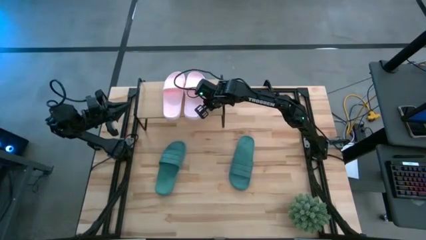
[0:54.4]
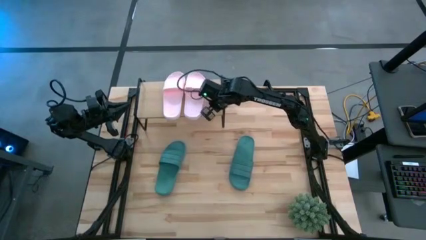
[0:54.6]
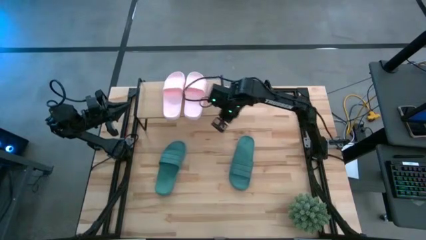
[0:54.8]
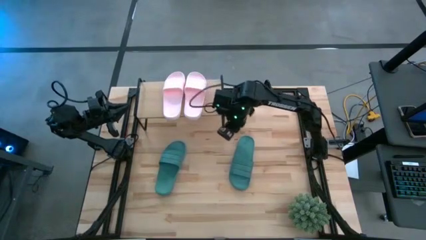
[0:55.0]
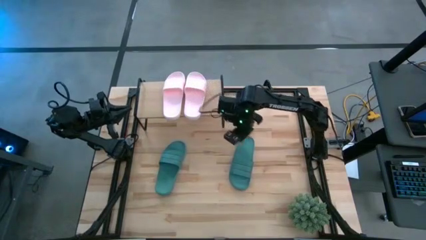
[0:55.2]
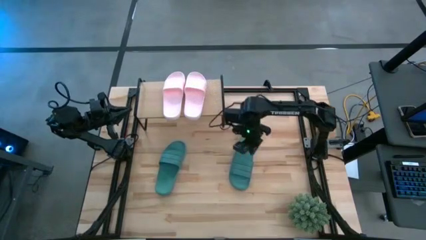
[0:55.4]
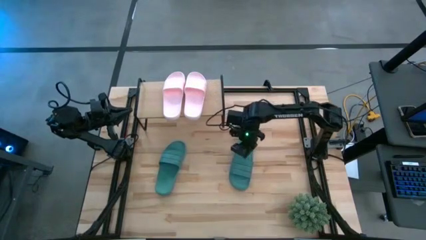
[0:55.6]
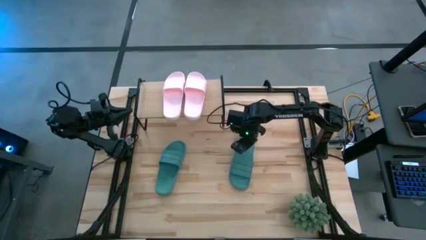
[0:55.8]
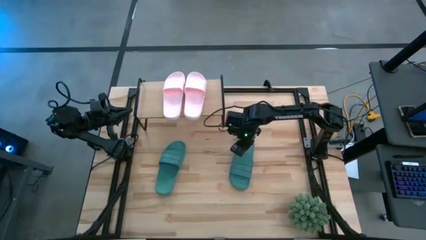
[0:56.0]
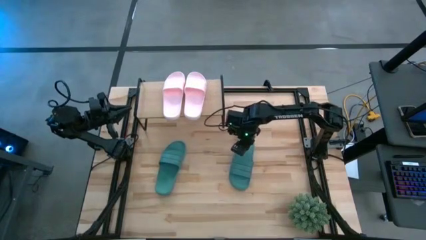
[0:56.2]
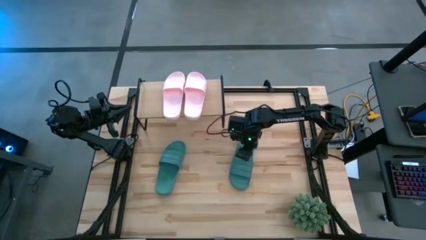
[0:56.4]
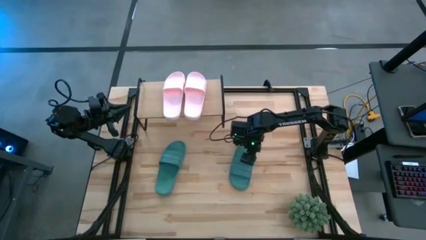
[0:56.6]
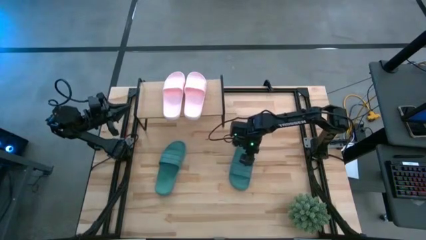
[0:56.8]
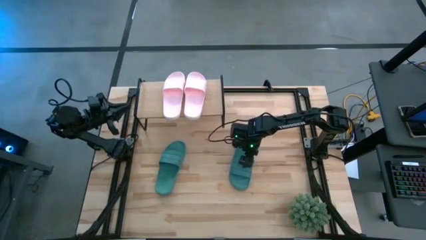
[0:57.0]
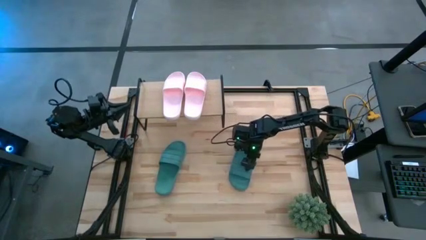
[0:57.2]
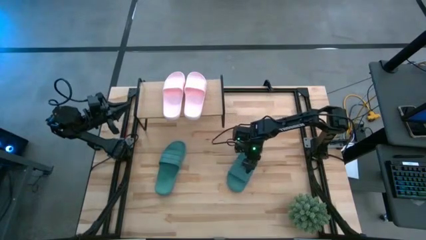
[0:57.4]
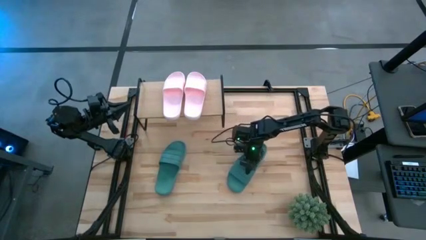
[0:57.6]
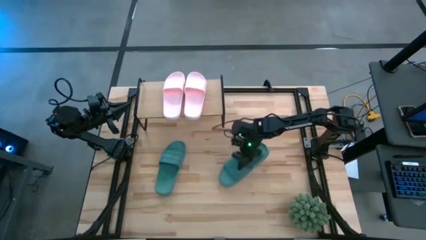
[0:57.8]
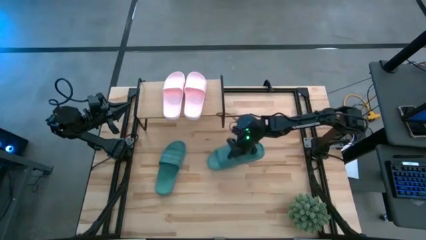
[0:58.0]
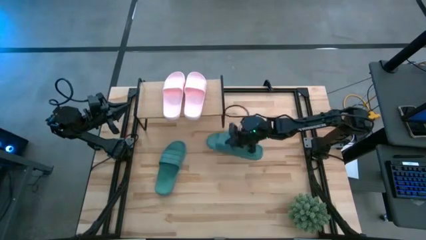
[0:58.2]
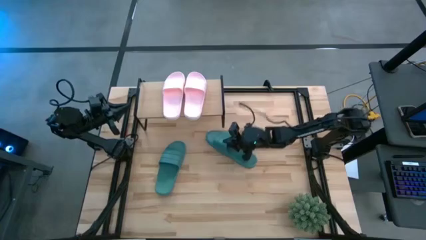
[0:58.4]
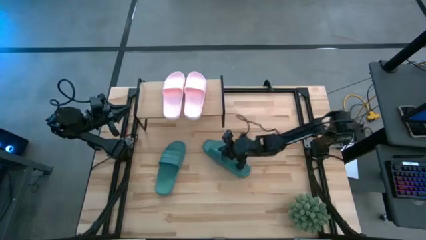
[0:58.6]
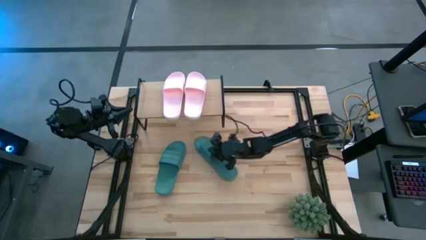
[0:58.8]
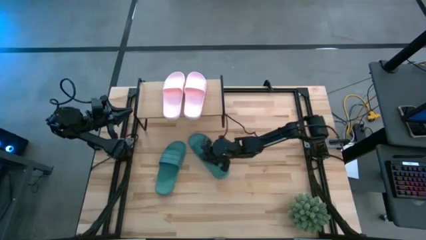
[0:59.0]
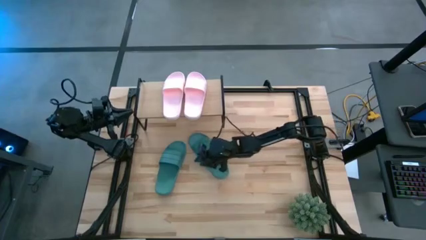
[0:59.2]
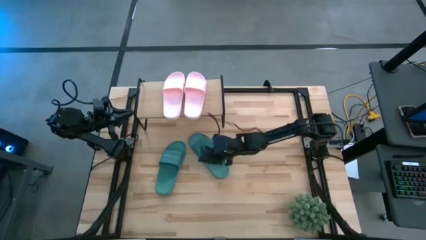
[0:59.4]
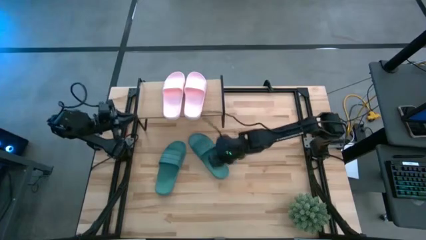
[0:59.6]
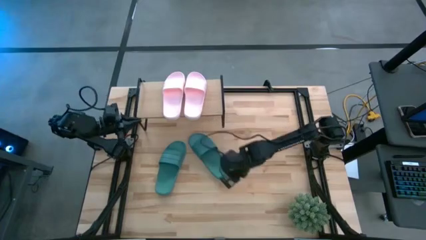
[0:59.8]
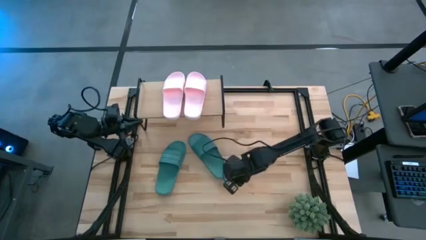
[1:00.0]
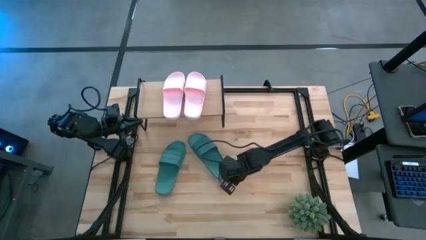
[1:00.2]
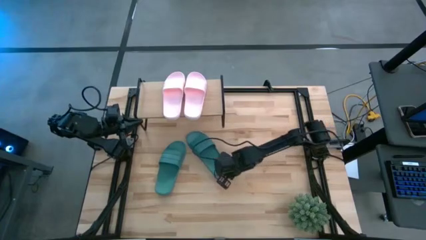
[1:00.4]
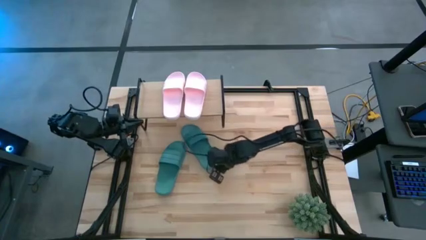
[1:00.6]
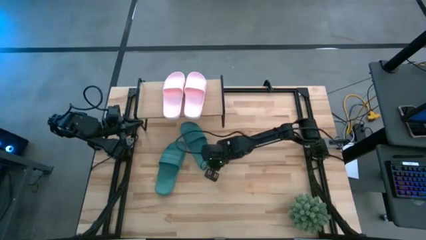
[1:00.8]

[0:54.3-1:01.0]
Task: Pick and place slides into the shelf
Put the right green slide under the shelf

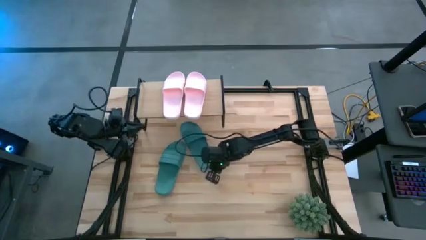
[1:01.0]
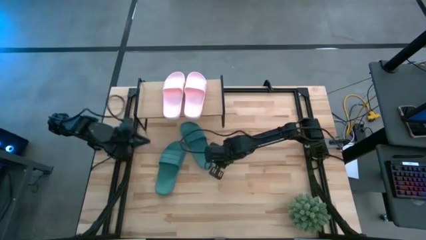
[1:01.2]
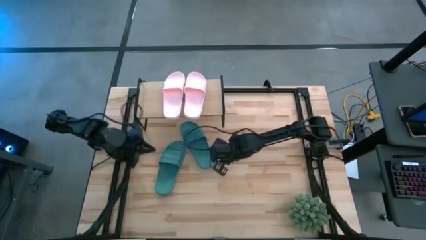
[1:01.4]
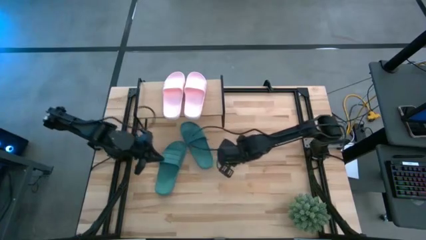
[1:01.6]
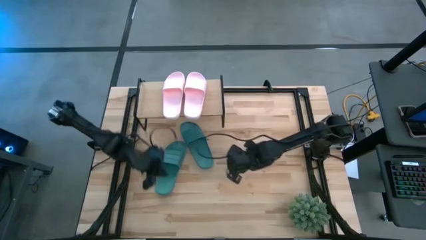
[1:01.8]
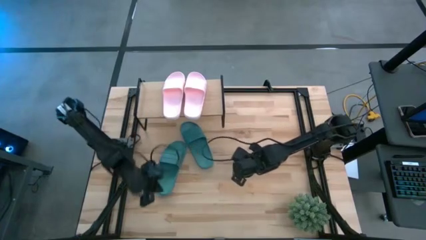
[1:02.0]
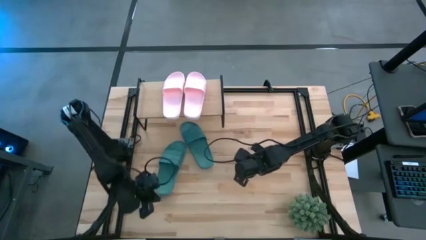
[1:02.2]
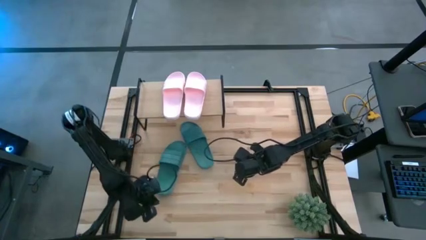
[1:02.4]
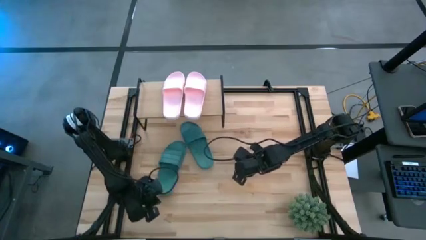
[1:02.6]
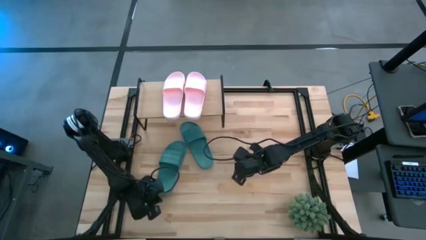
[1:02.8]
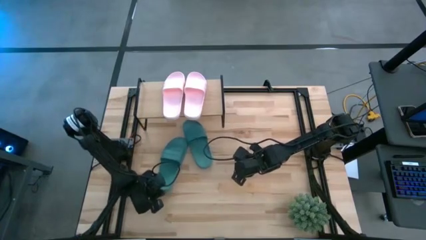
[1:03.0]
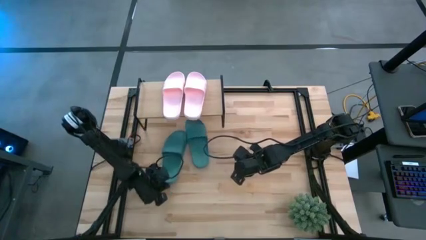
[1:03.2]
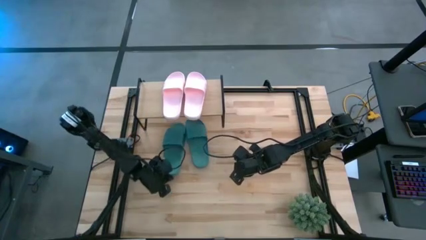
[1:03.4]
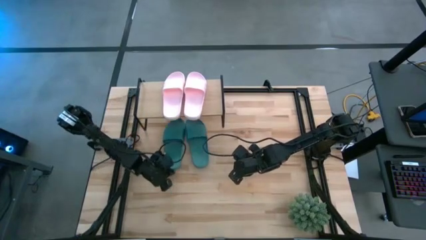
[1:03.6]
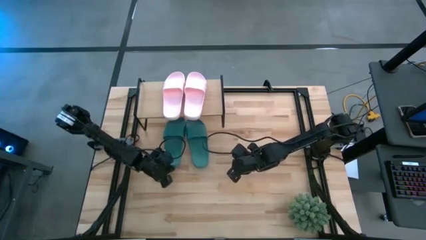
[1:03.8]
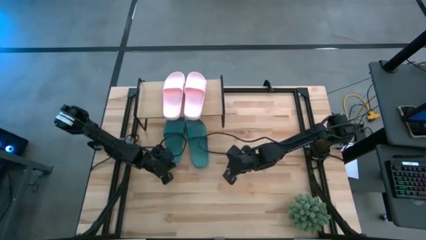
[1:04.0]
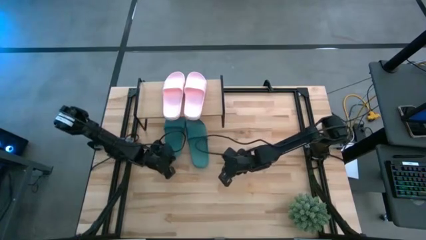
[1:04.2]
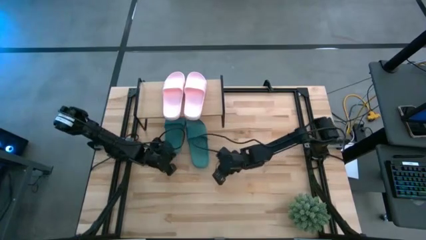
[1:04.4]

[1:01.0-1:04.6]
Put the green slide under the shelf

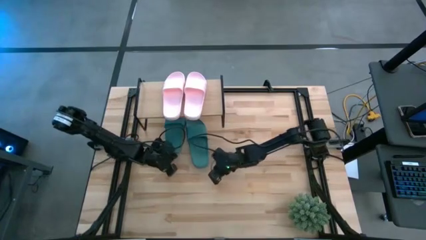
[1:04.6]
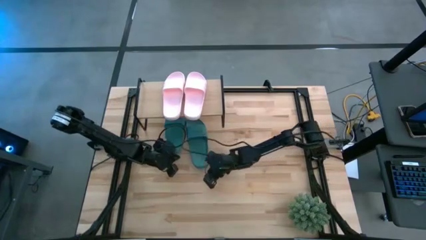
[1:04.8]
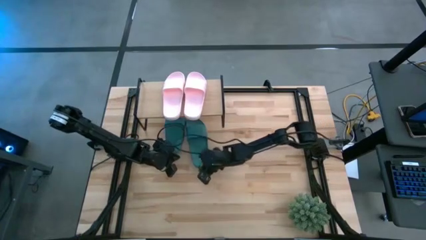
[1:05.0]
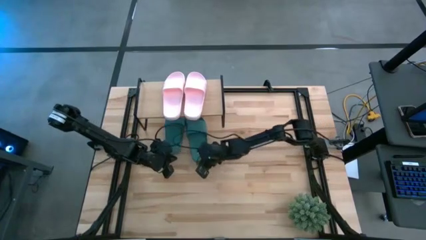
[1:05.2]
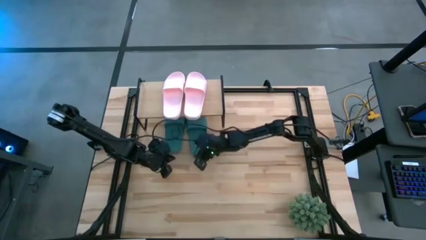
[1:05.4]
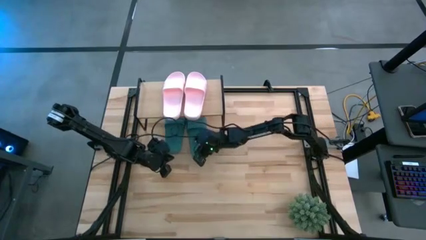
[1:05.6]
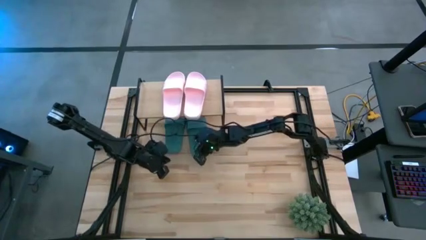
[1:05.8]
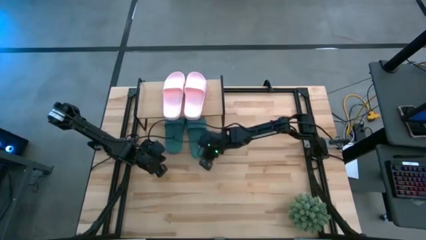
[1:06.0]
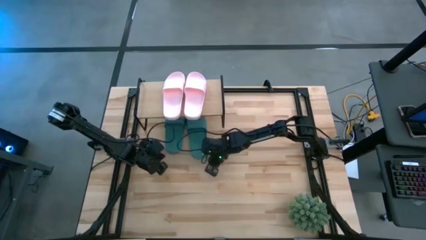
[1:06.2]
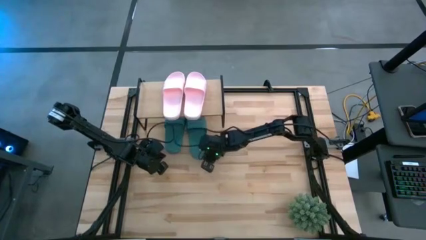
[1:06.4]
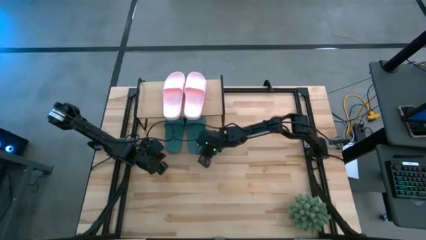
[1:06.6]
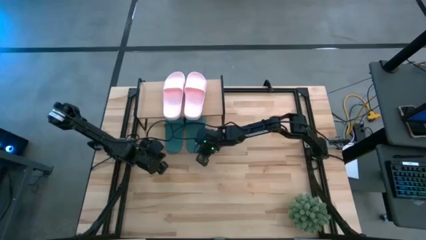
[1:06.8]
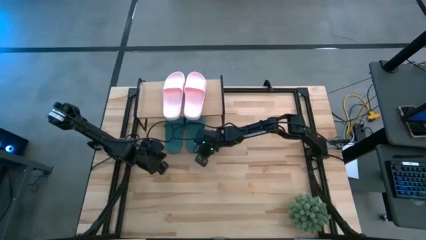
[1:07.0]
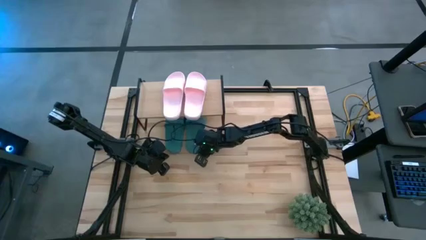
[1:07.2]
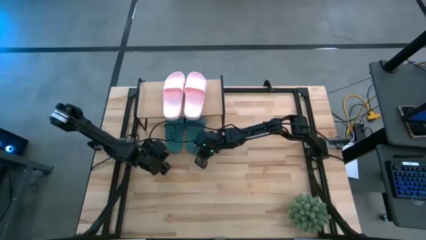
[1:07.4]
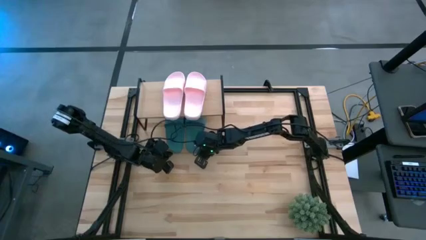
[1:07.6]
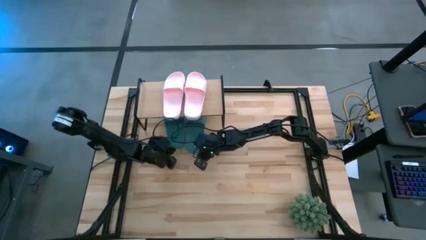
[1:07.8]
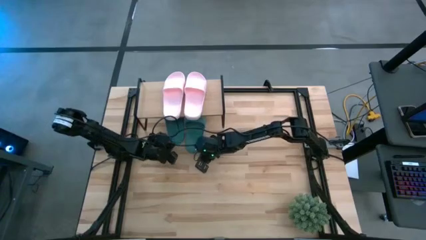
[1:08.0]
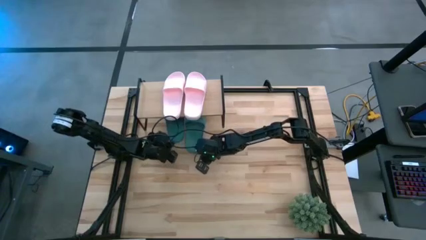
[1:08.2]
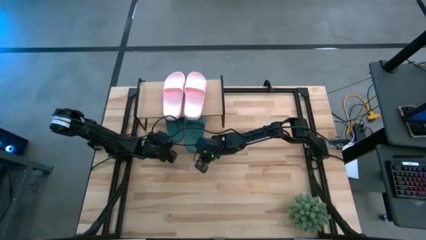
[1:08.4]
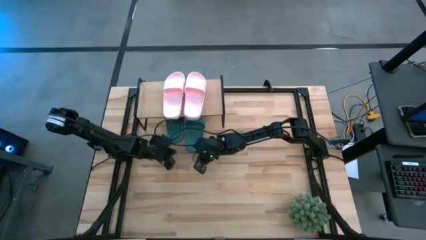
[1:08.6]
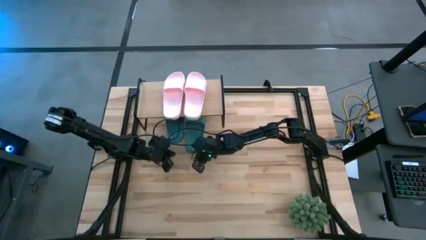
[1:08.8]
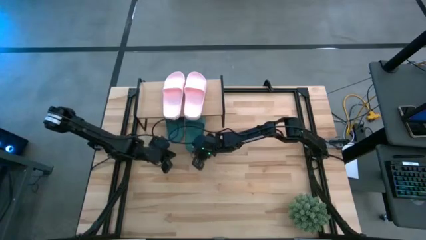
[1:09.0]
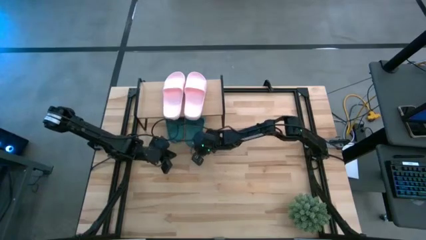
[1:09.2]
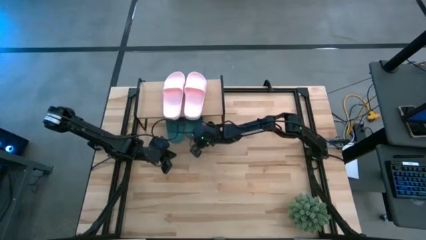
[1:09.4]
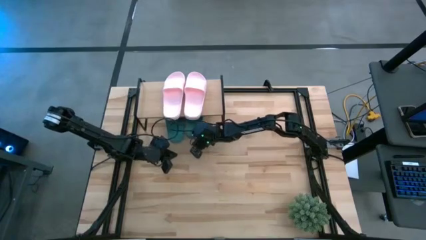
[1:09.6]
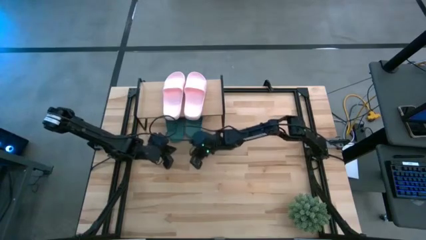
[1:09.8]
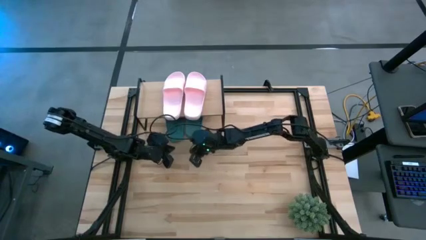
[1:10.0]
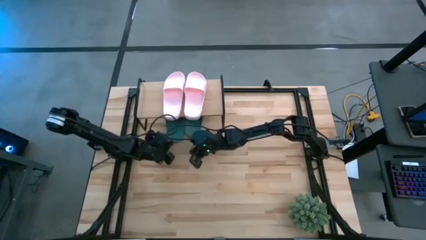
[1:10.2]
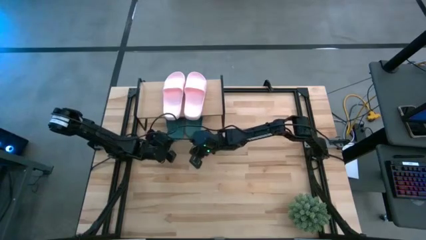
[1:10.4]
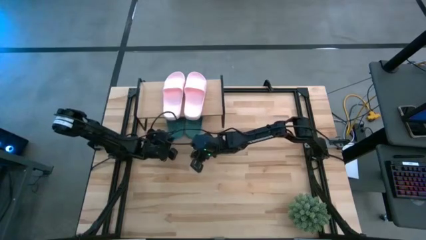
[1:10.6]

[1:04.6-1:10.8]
Adjust the green slides under the shelf
